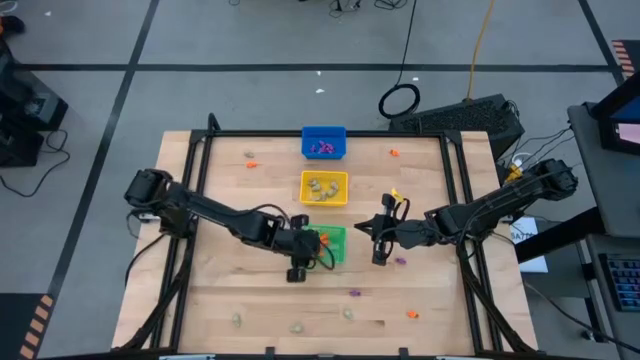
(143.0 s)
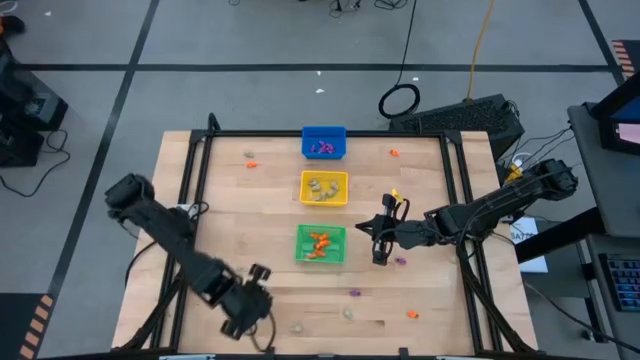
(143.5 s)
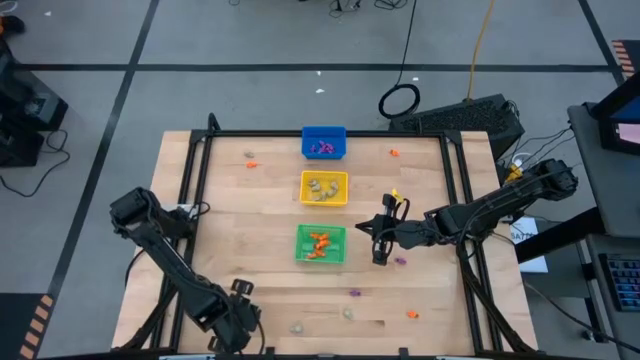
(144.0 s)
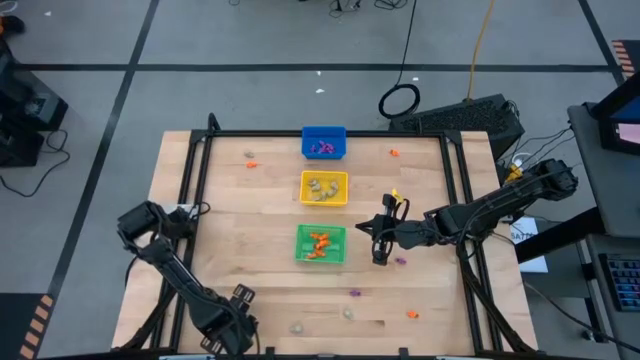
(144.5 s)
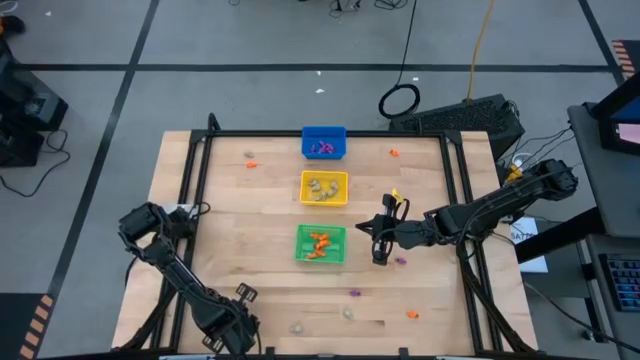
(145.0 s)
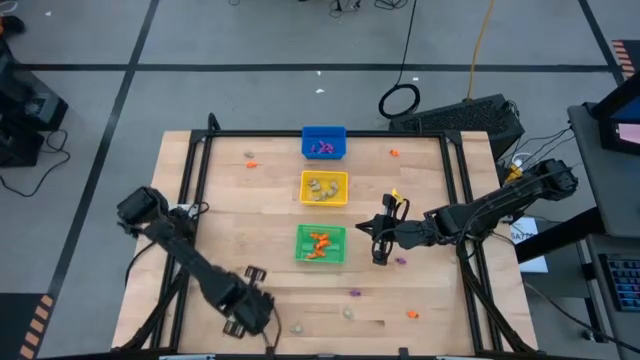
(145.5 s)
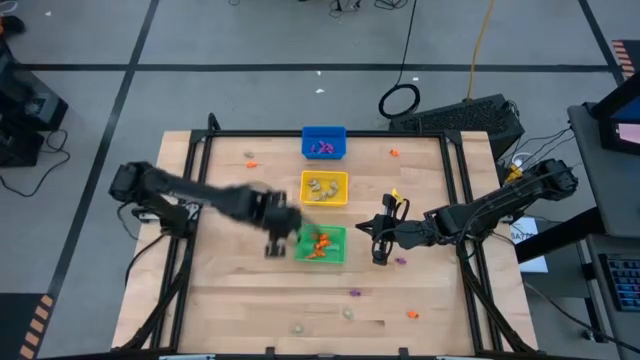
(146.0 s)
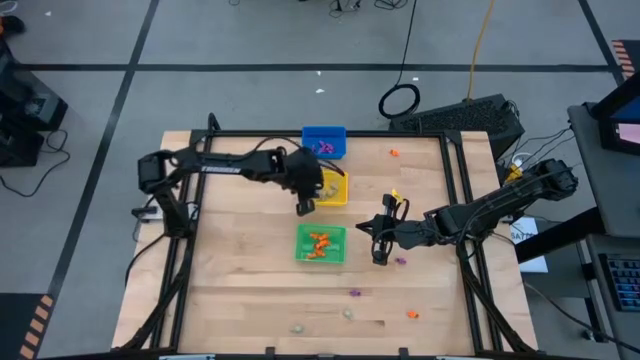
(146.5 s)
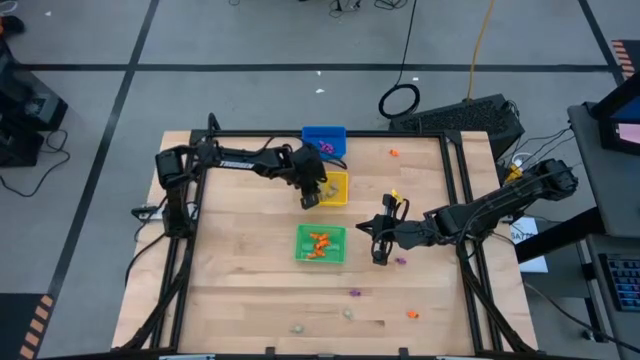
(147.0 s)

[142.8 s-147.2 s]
Task: Sort Halloween decoration
Put the bottom left skull toy into the yellow bin

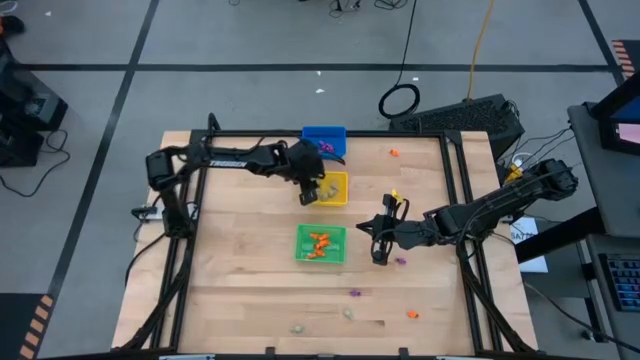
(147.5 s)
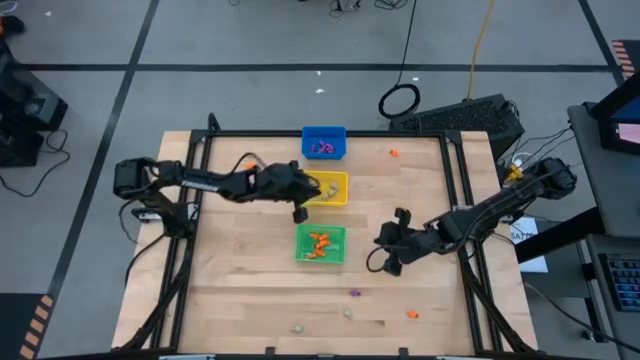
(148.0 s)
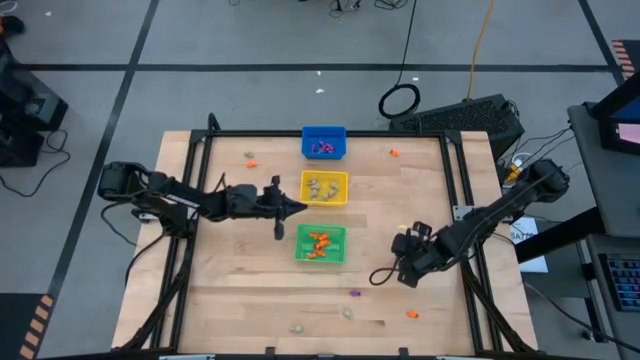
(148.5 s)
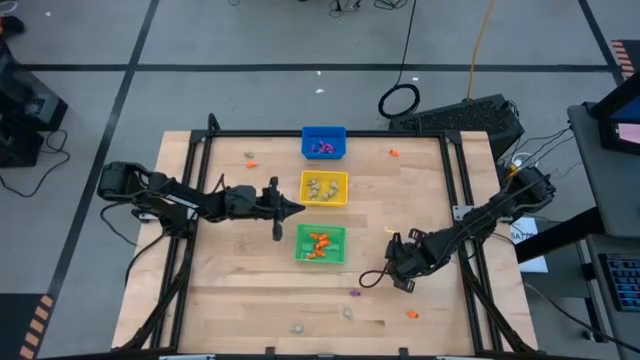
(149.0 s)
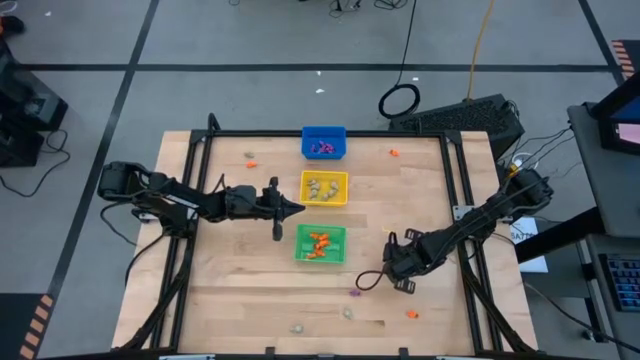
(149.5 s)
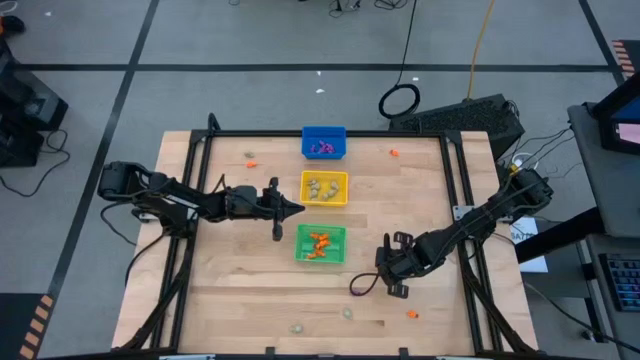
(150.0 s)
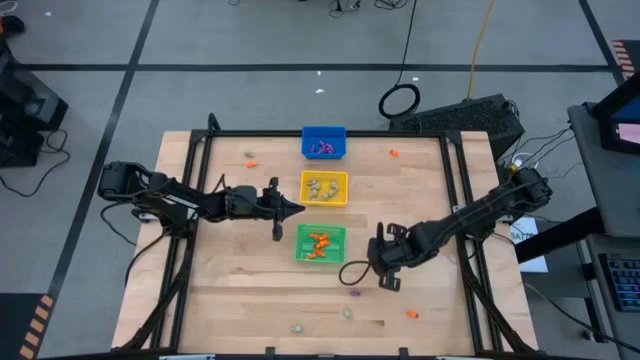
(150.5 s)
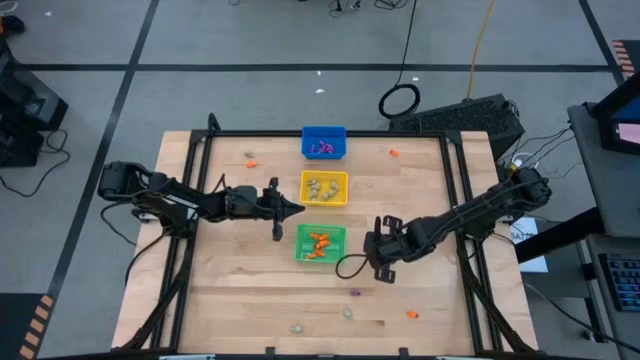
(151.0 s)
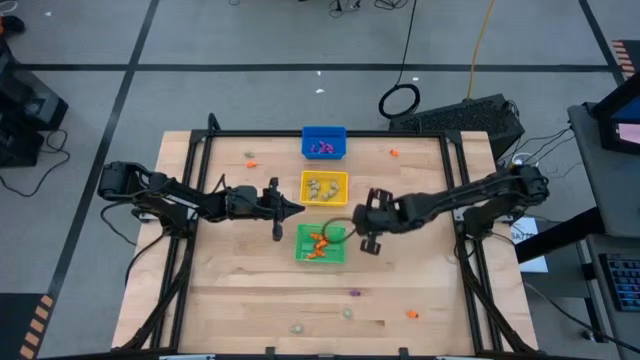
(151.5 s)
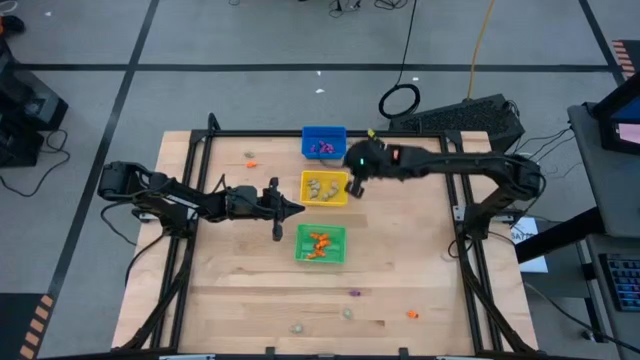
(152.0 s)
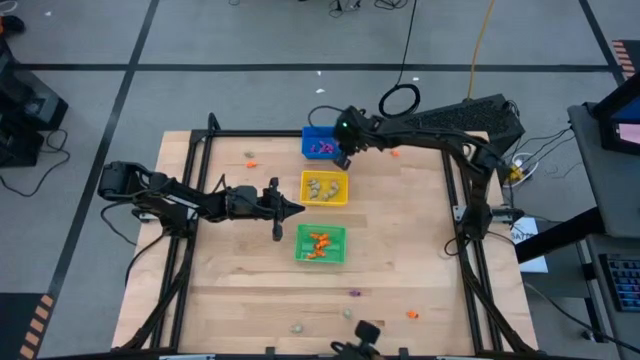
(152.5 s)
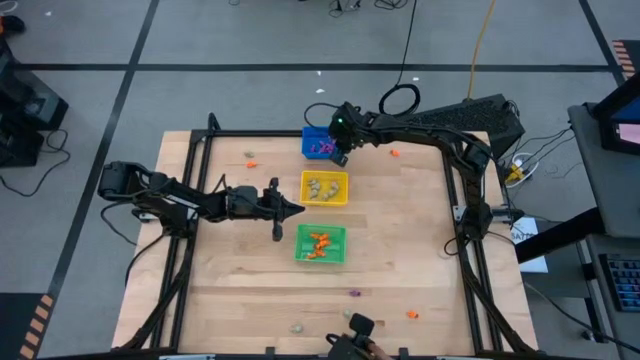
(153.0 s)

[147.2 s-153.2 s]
Put the right purple skeleton toy into the blue bin

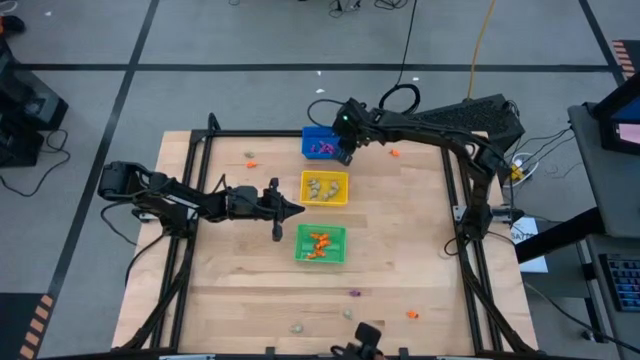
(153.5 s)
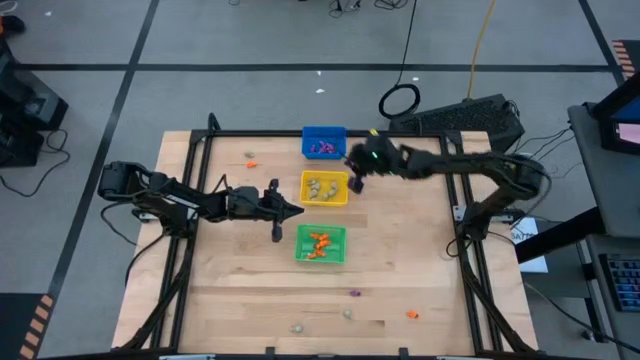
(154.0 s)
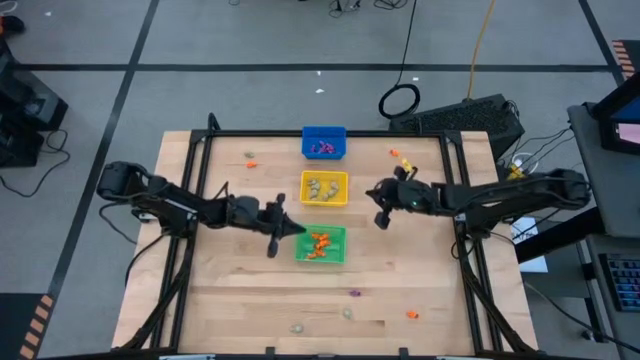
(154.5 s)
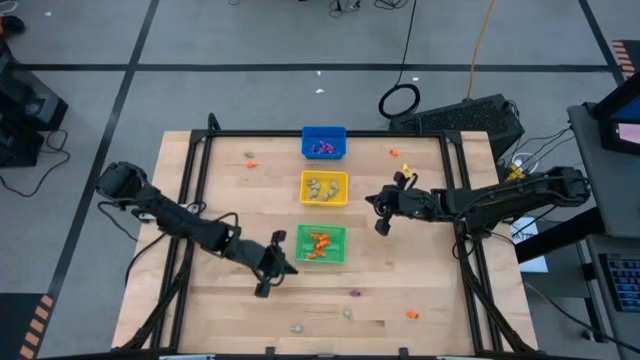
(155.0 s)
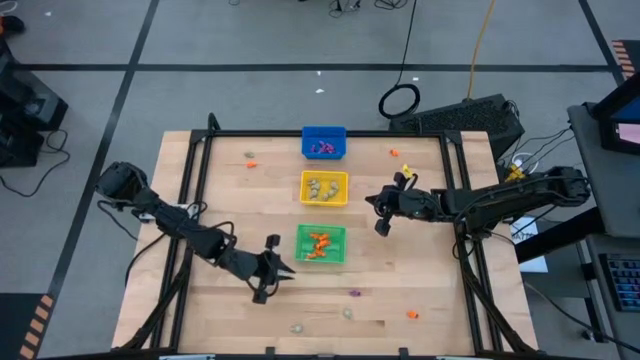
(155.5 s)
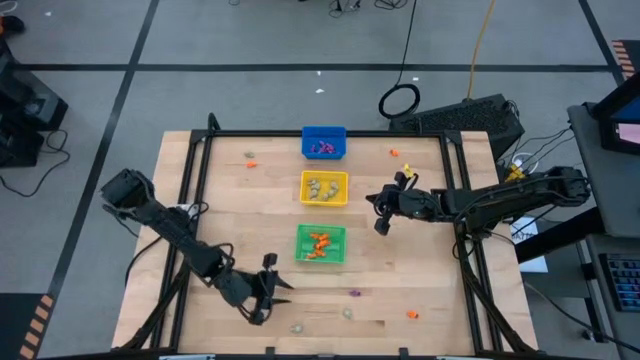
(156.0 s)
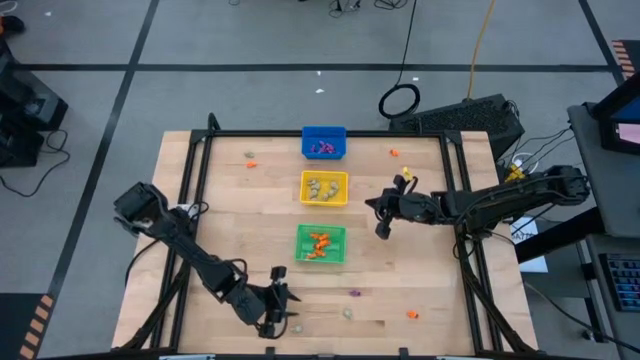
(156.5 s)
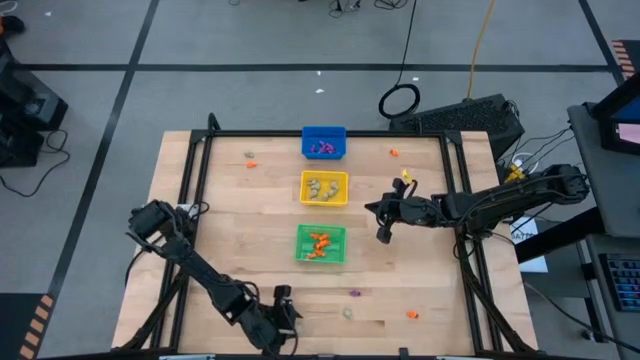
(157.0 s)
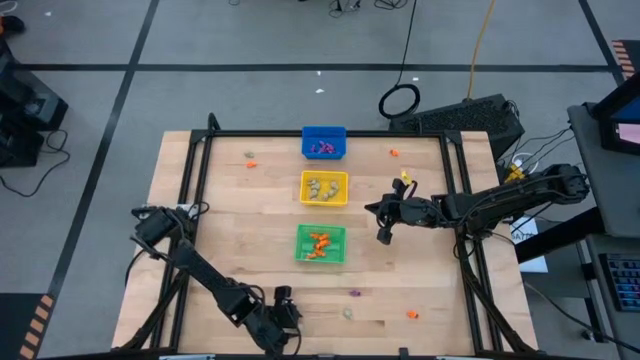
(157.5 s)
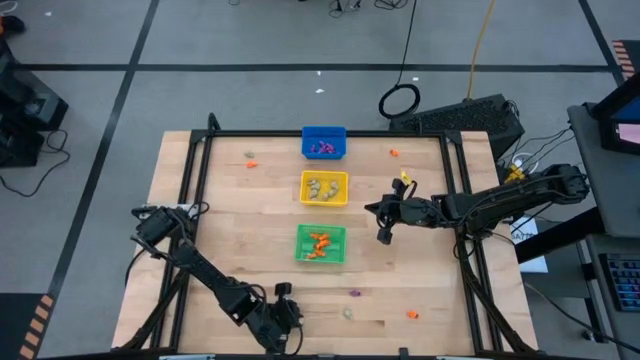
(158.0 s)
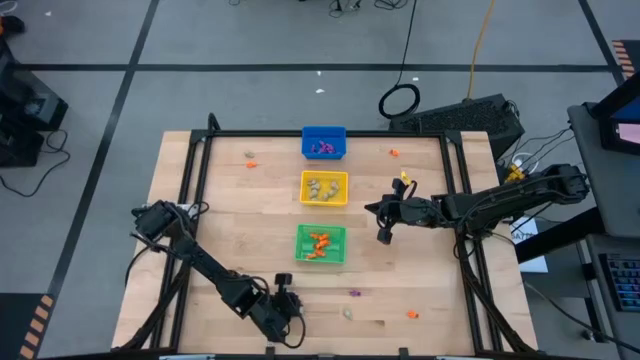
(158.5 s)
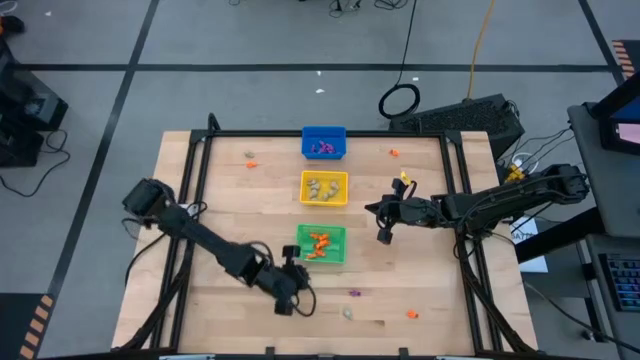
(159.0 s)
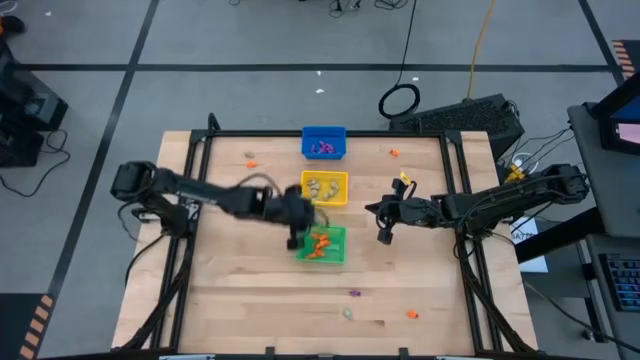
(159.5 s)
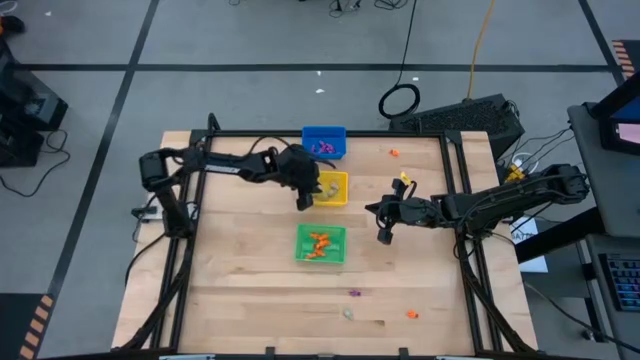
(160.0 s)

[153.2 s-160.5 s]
Put the bottom left skull toy into the yellow bin

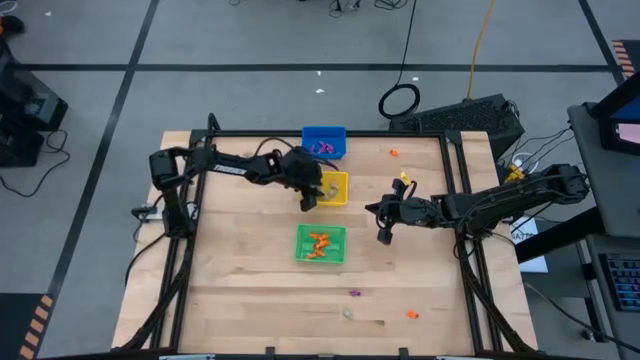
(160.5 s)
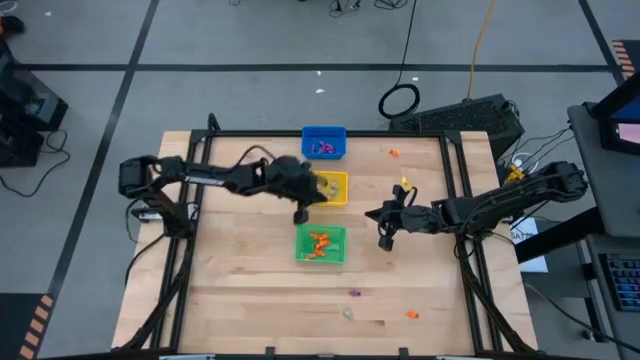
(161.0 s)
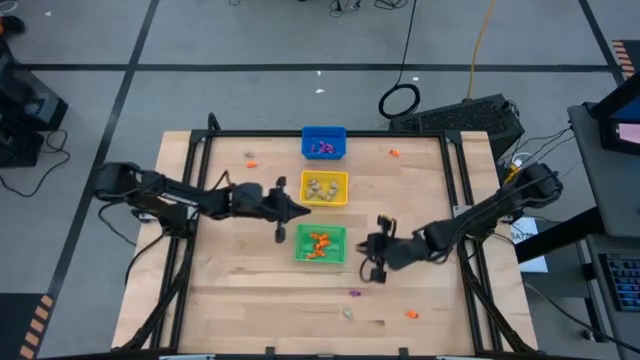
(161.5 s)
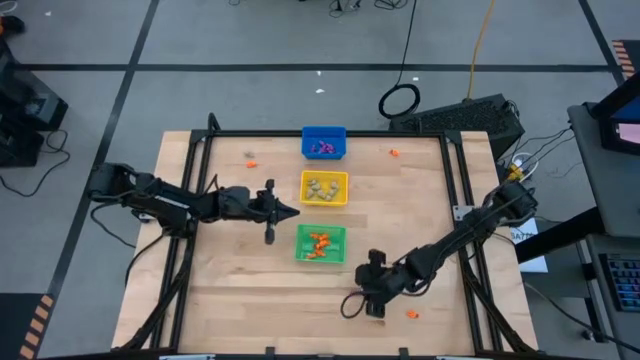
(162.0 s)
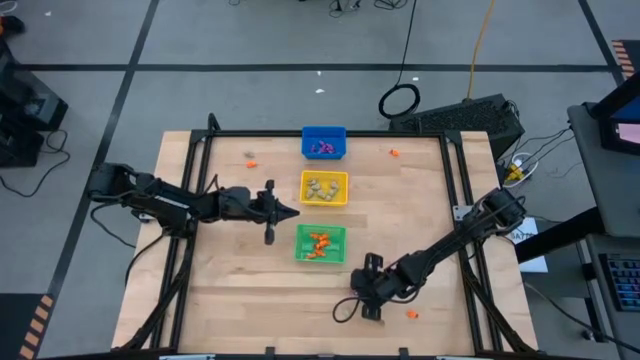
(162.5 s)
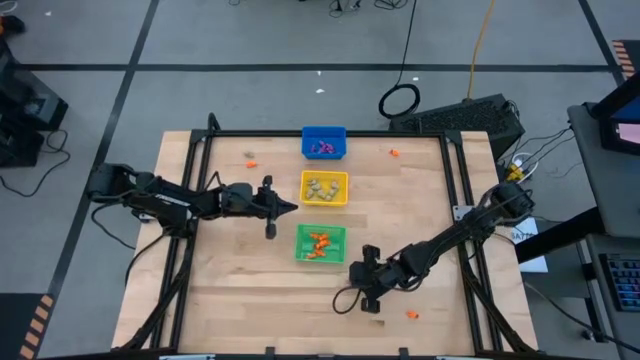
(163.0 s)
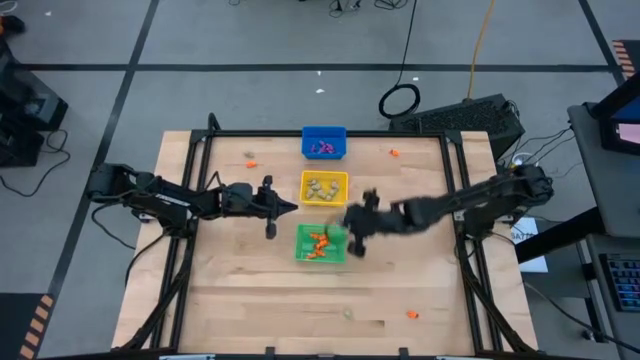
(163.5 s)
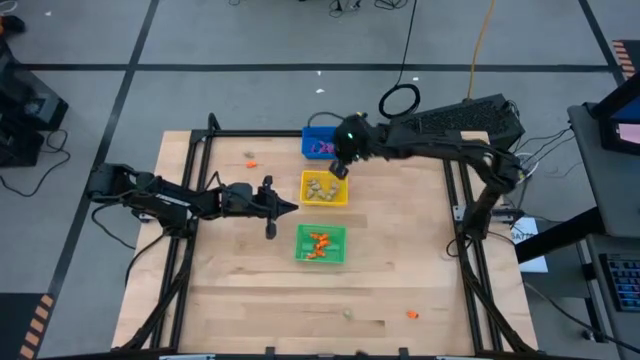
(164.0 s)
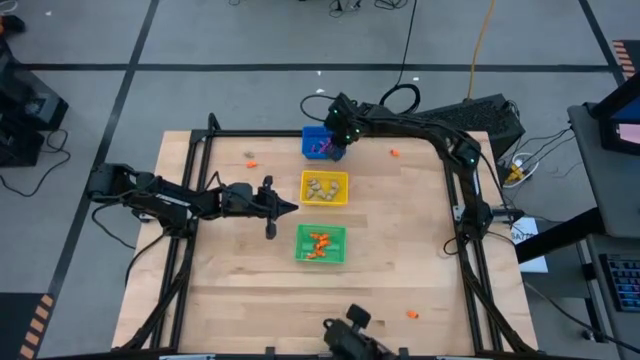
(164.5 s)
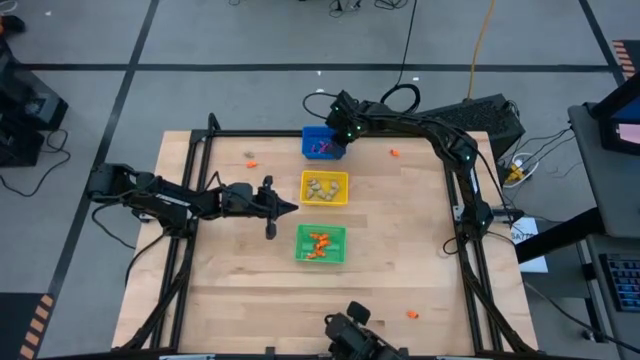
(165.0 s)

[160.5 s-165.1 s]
Put the purple skeleton toy into the blue bin
